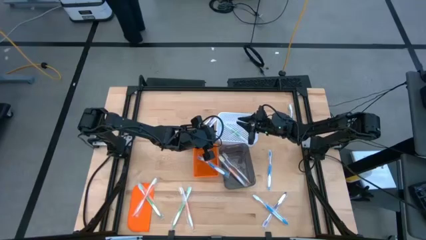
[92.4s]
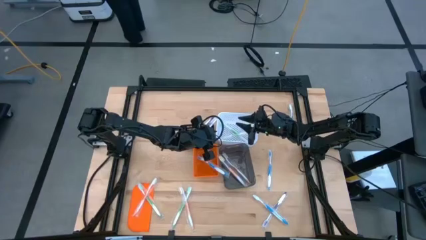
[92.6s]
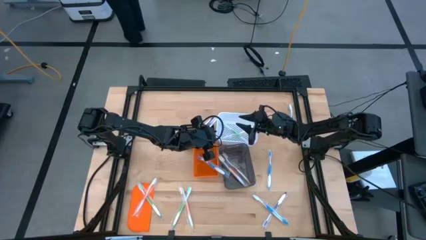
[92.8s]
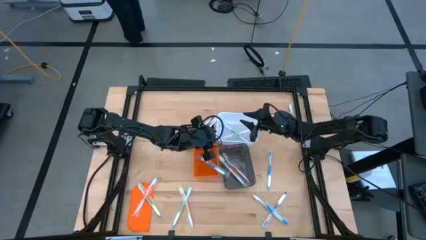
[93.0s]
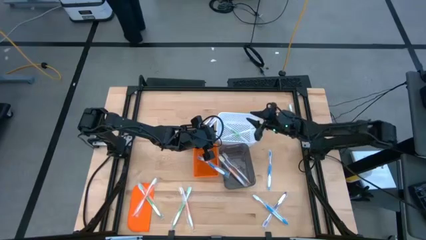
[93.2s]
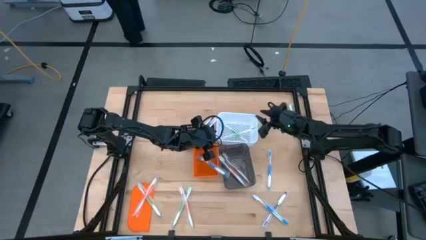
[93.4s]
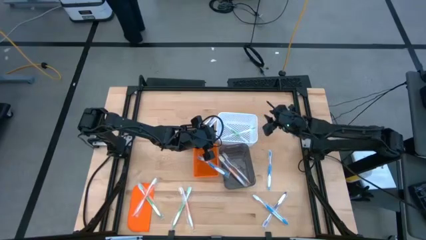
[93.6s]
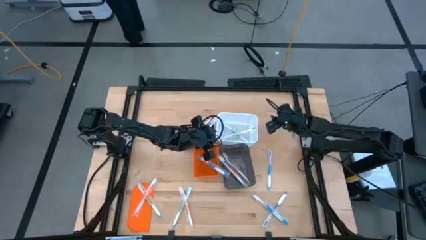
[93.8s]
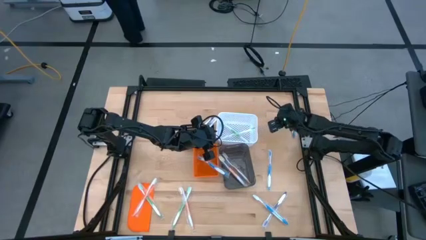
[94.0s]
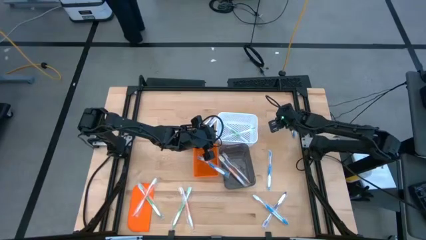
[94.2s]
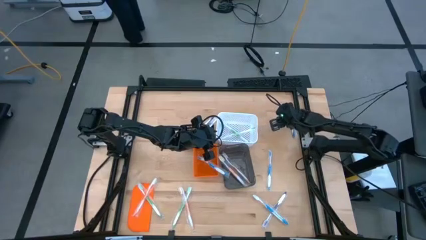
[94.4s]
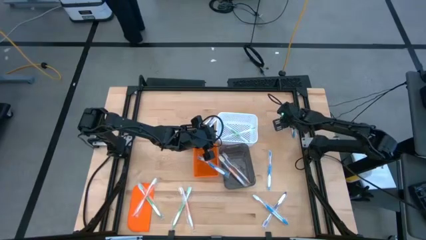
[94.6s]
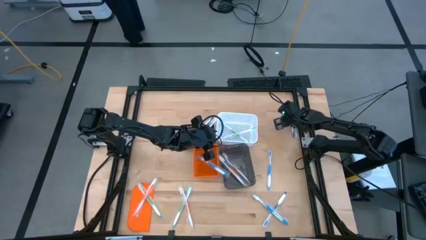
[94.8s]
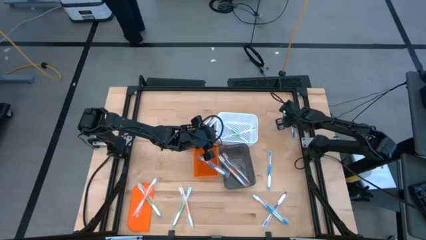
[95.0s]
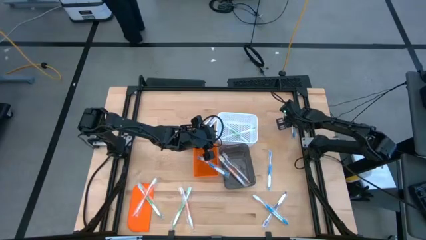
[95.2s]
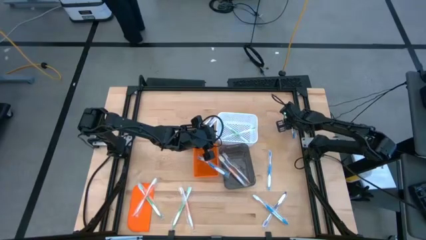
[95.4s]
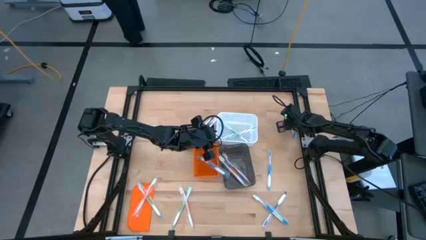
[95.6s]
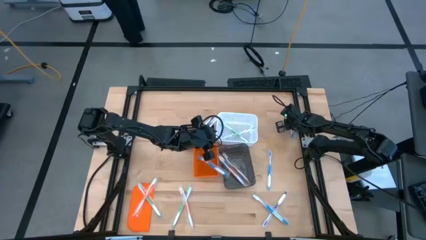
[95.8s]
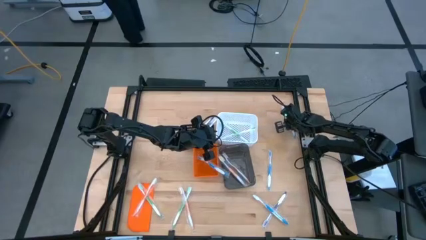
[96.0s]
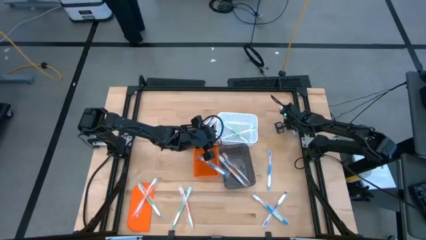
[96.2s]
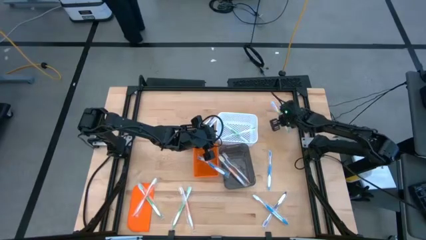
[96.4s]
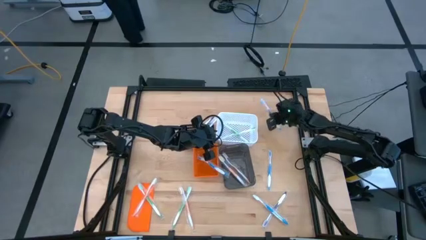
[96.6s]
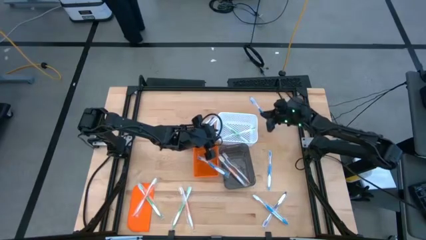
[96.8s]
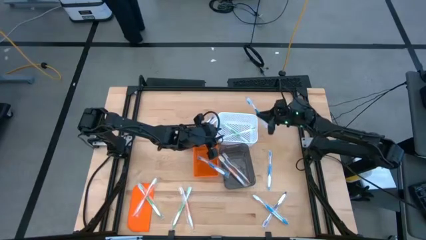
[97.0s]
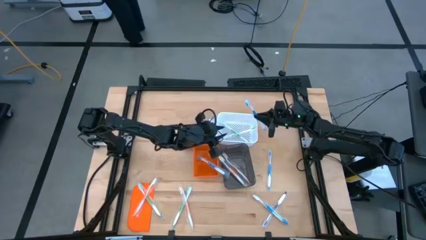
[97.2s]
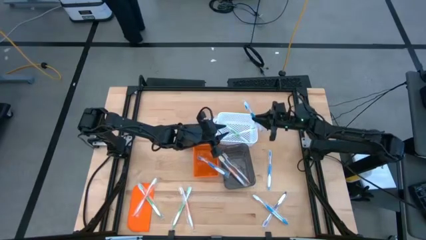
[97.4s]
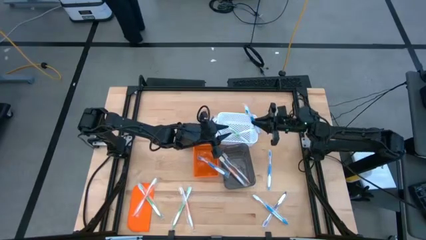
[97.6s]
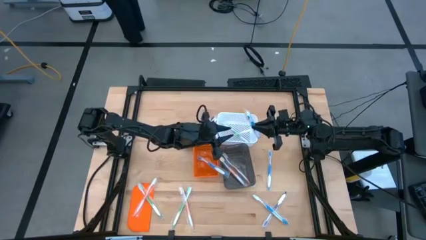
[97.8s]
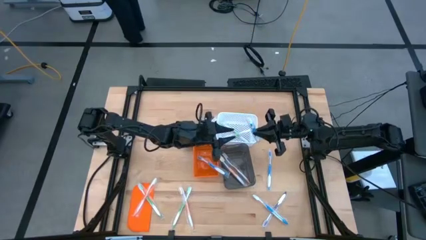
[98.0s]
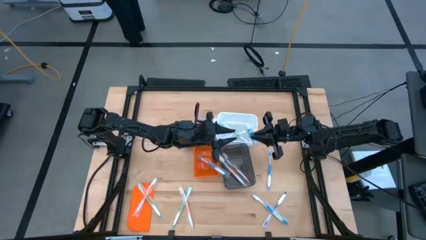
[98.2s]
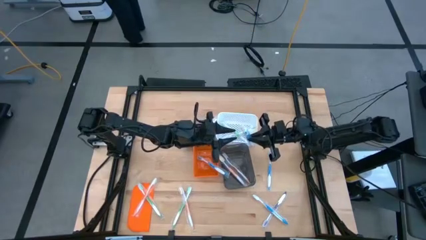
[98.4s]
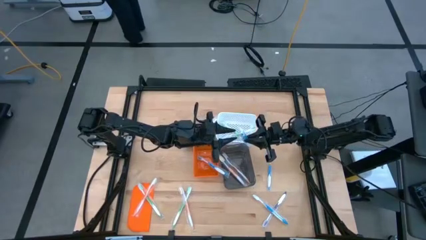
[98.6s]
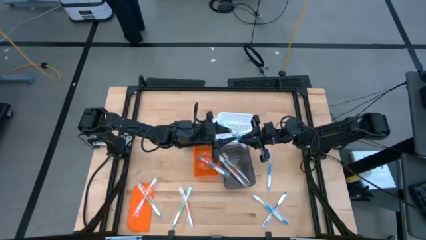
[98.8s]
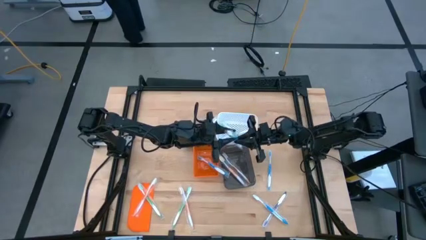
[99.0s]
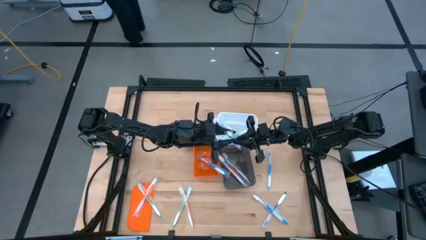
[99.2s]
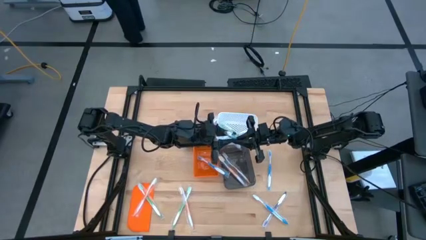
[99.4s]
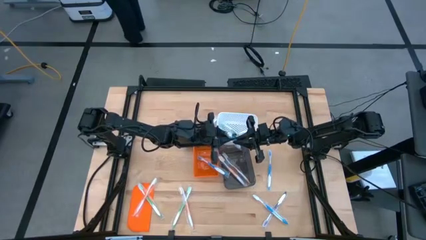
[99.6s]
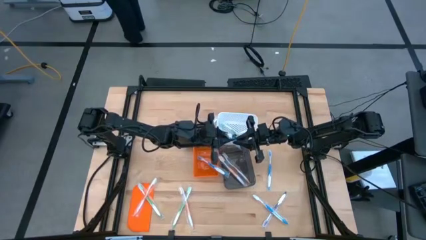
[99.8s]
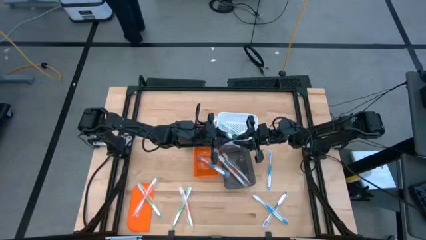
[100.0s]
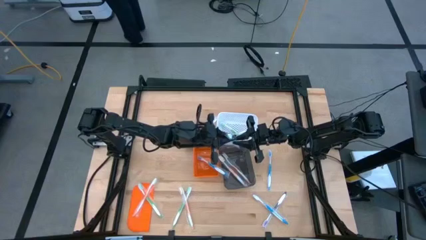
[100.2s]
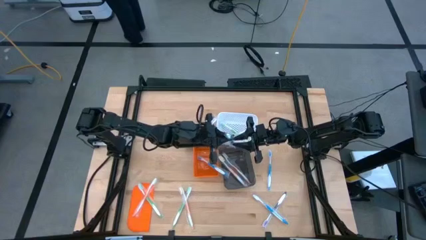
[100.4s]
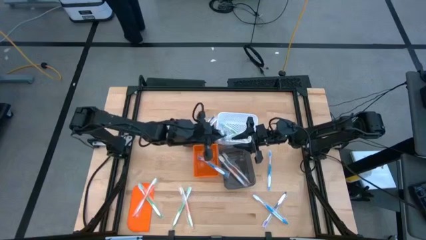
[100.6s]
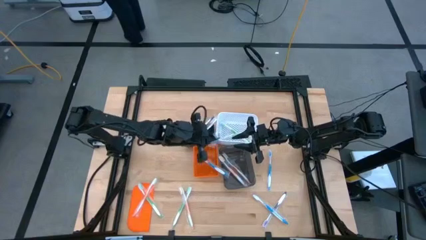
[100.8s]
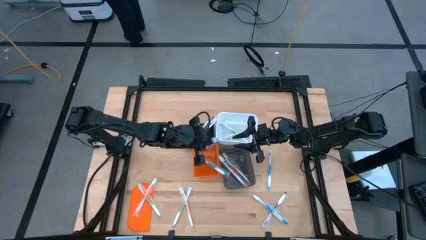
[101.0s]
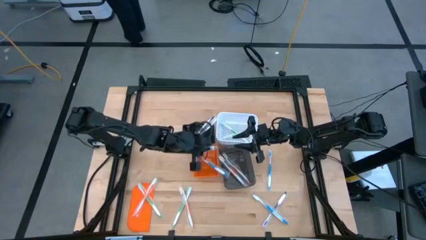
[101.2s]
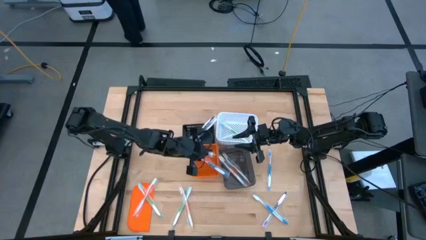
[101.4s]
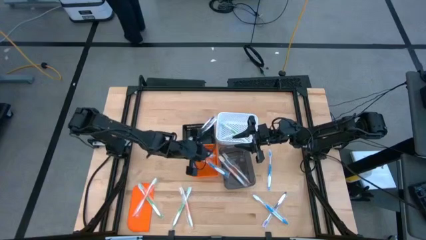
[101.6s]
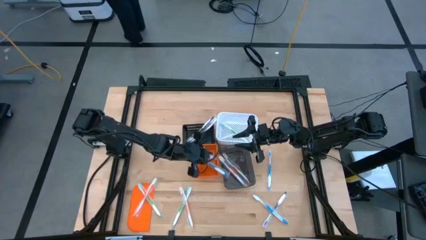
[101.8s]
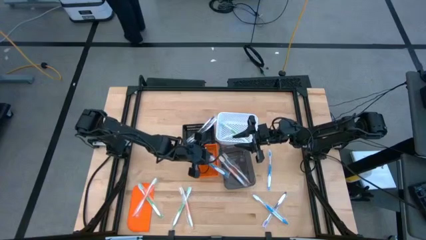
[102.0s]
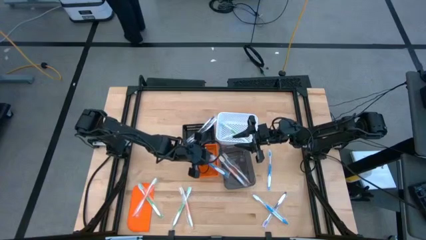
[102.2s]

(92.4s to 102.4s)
Task: Pick & Place Toothbrushes
Put the blue toothbrush into the orange bin

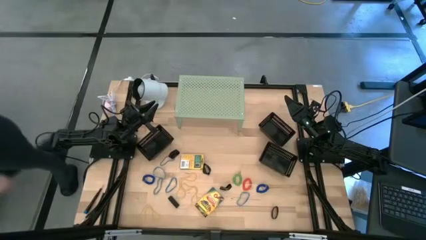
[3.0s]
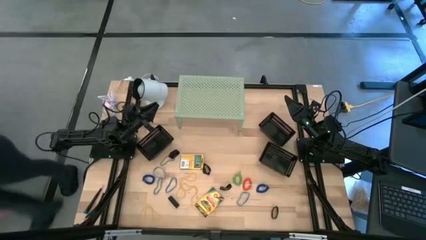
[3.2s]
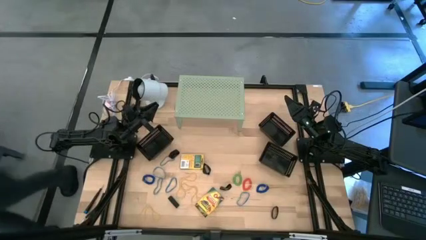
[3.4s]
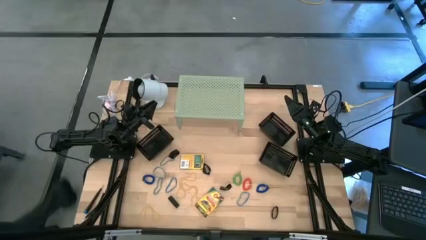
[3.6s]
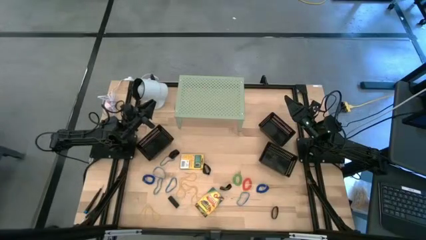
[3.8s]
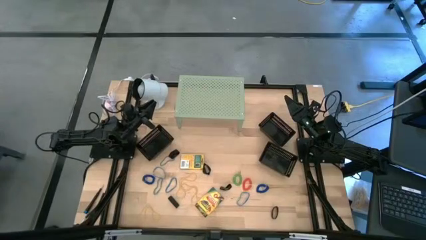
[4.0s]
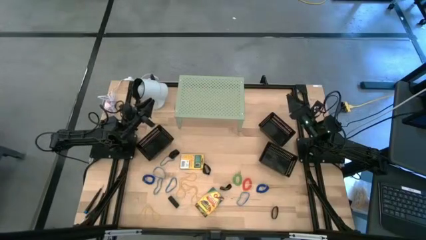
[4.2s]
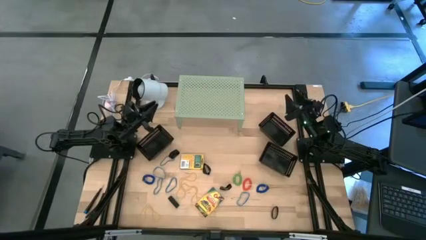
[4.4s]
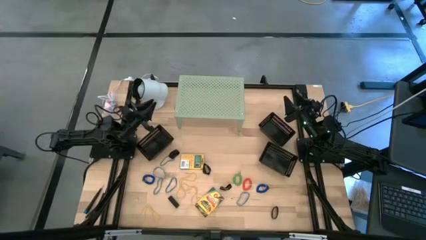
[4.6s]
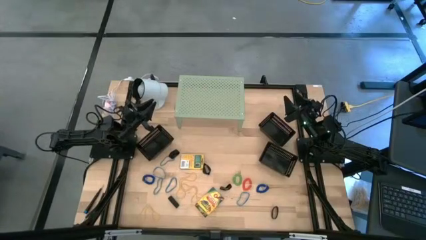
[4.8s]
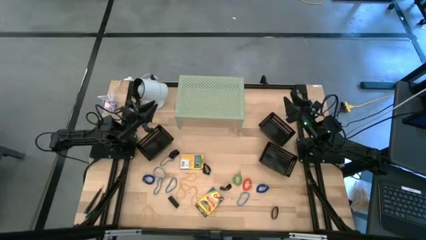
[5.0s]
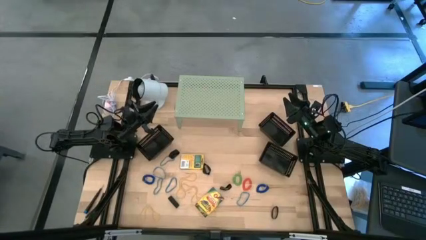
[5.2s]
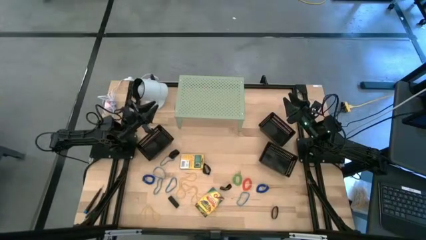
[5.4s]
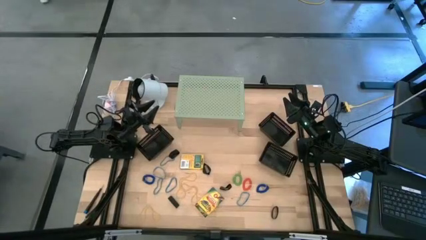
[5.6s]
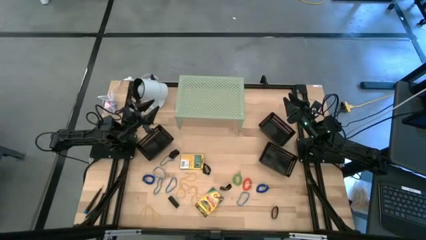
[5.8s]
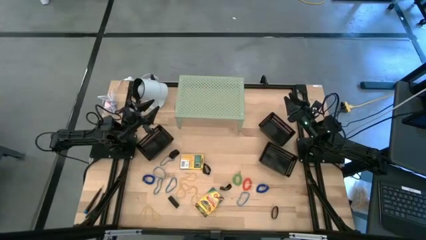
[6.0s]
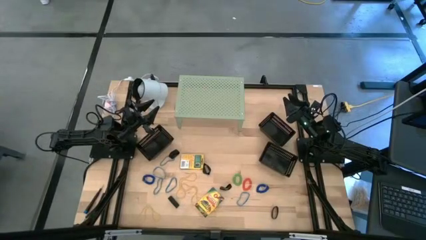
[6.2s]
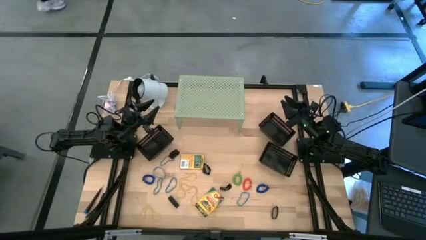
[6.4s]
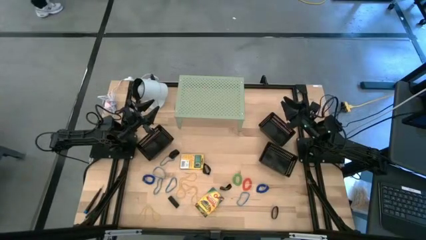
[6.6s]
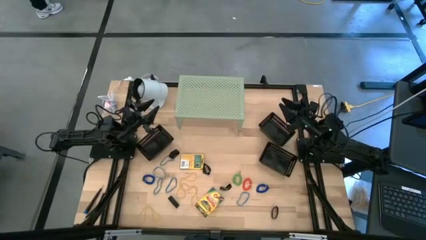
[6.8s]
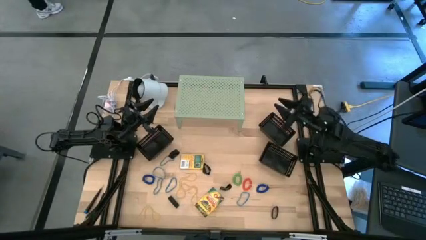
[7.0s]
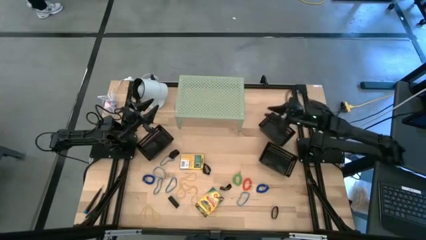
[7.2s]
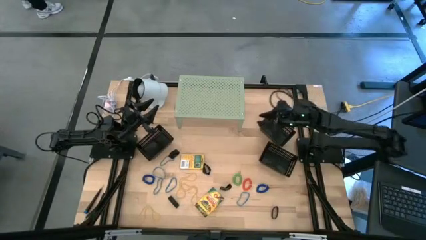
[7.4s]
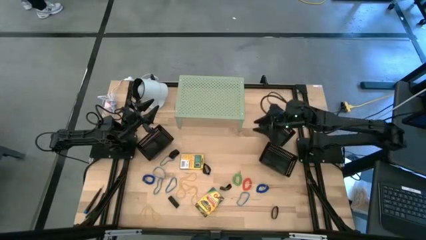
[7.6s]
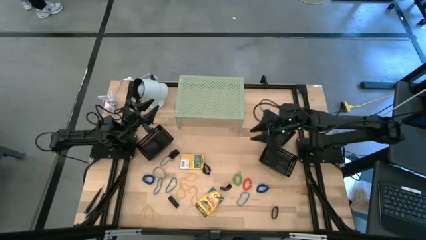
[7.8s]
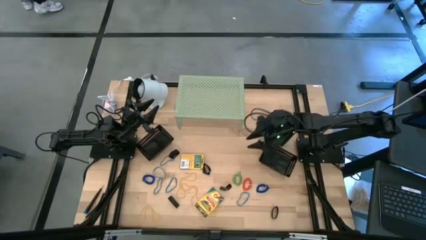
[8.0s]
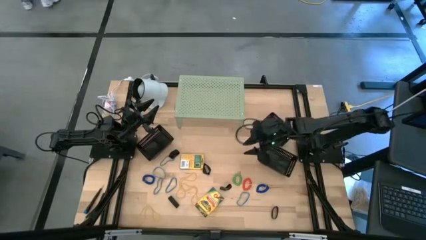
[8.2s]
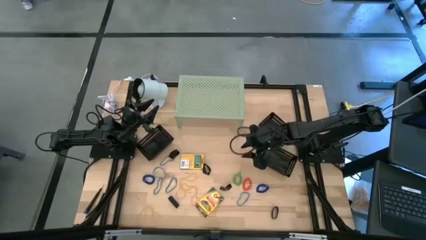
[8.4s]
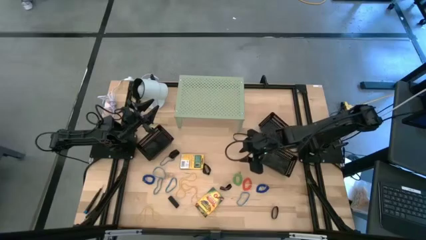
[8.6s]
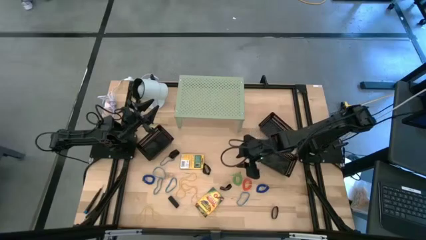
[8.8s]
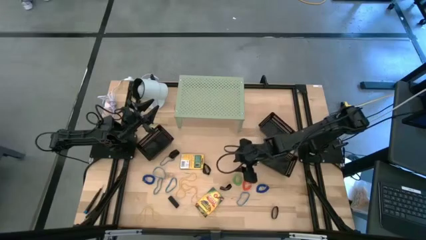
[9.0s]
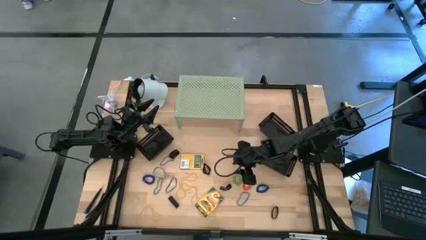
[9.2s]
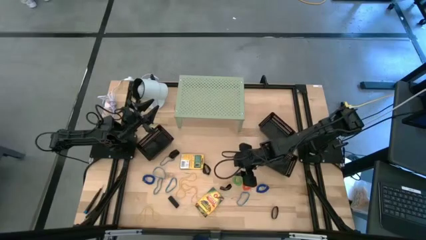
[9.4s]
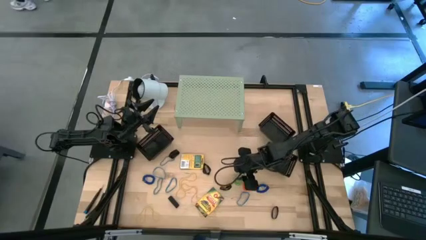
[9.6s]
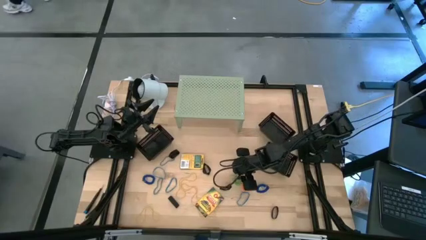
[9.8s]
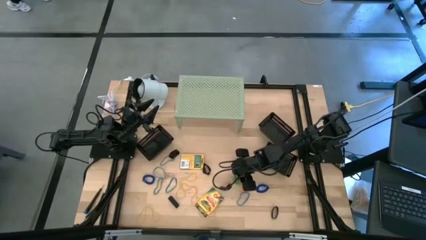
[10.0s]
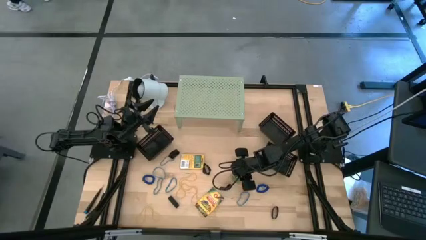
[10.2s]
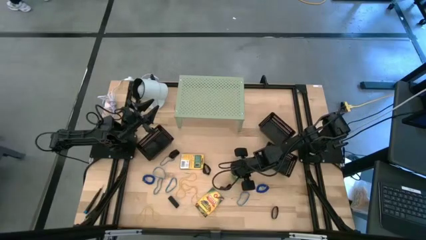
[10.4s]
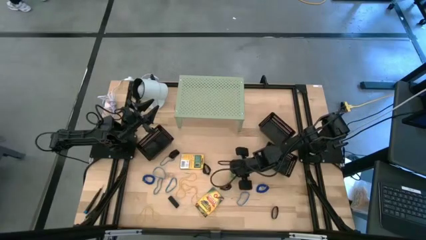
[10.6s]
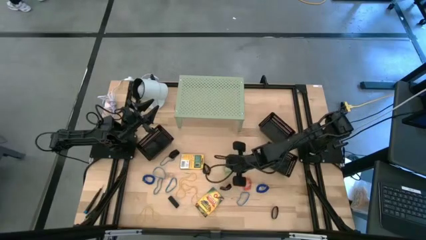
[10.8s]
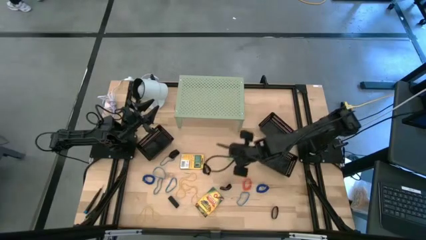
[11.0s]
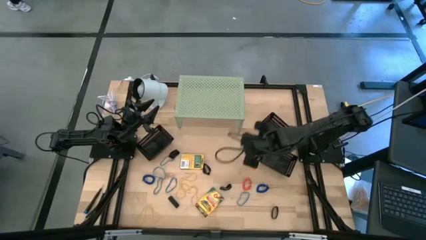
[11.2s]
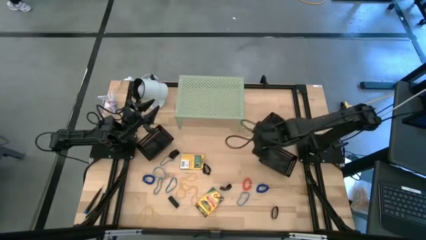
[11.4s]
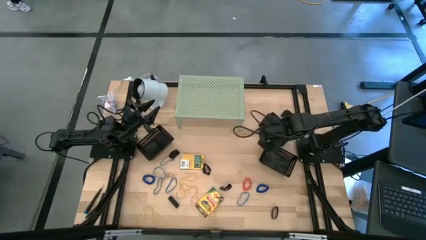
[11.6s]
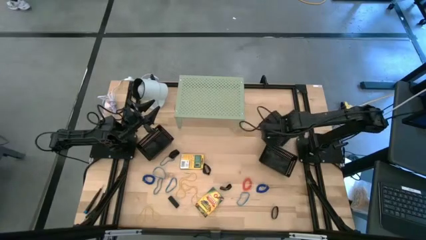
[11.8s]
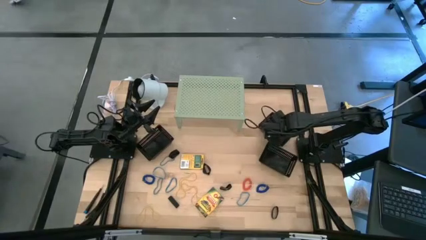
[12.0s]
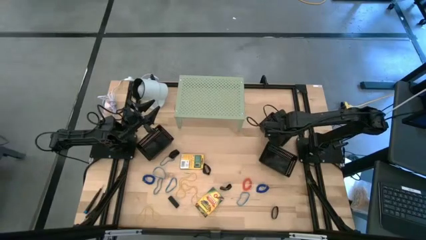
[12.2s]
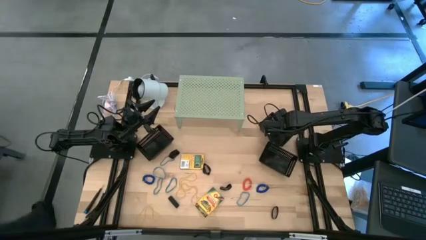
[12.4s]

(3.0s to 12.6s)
Task: Pick & Place Office Desk Supplies
Put the green spring keychain into the top black bin
